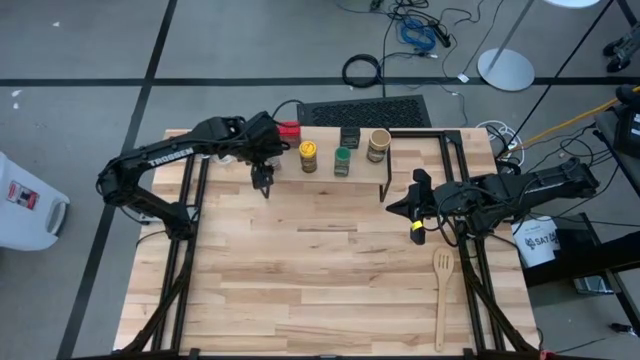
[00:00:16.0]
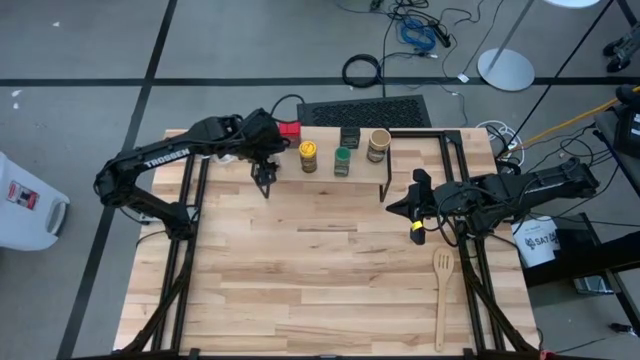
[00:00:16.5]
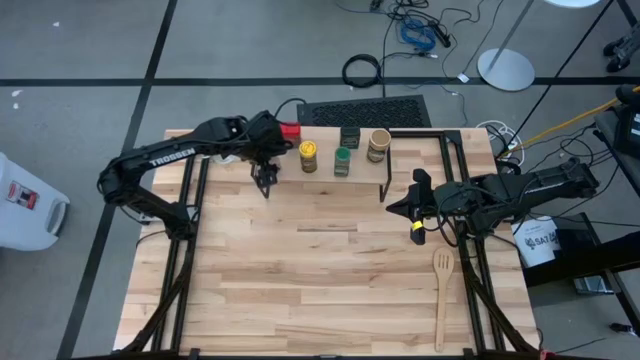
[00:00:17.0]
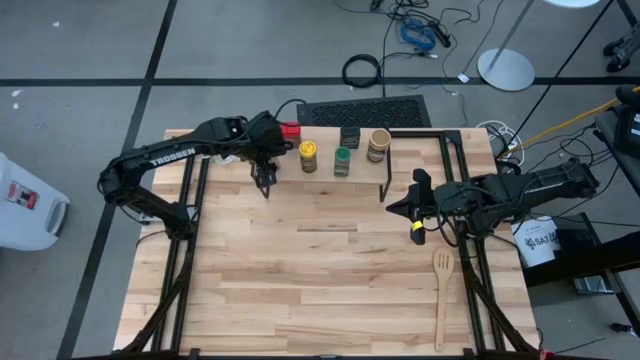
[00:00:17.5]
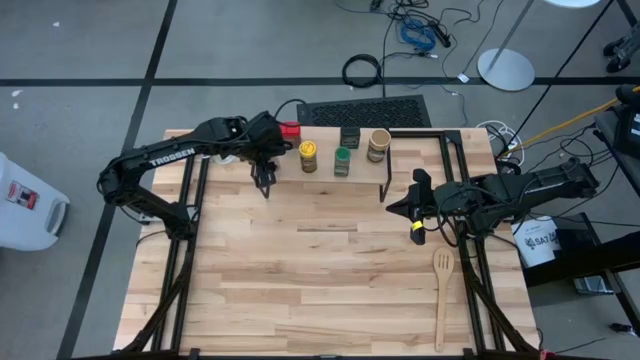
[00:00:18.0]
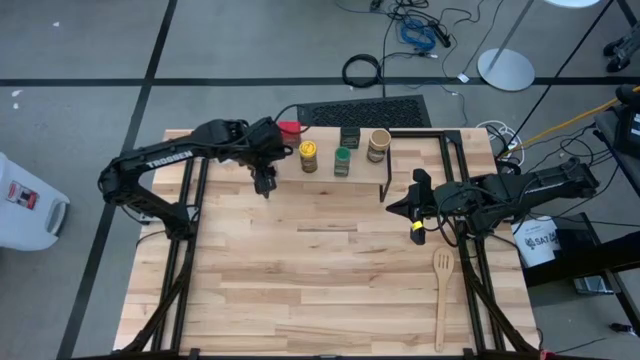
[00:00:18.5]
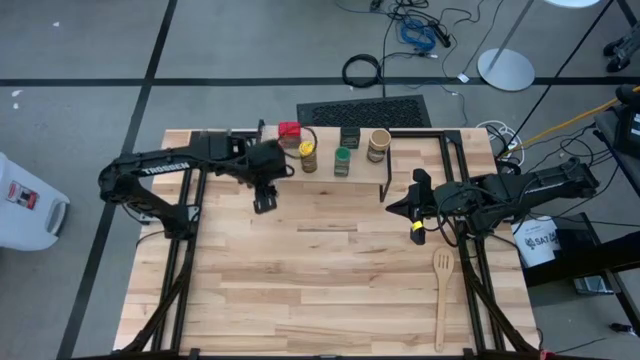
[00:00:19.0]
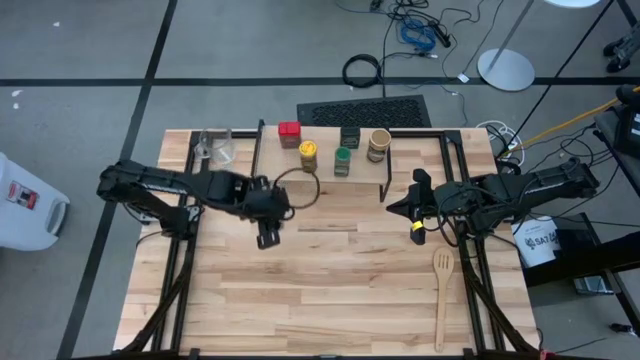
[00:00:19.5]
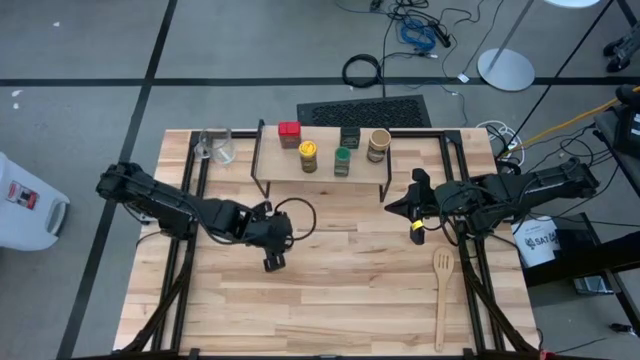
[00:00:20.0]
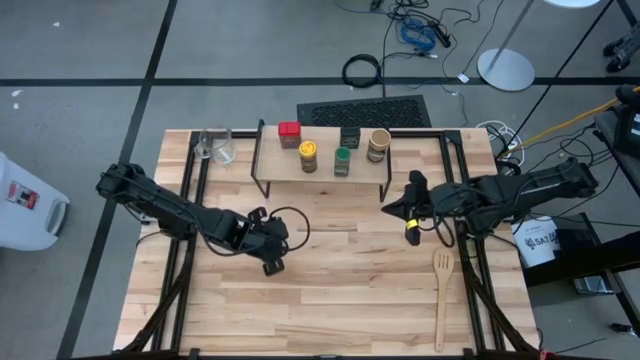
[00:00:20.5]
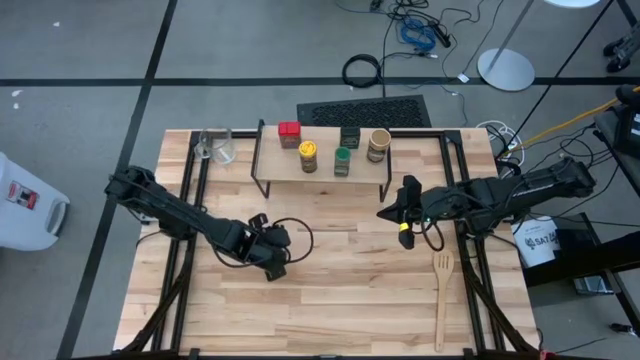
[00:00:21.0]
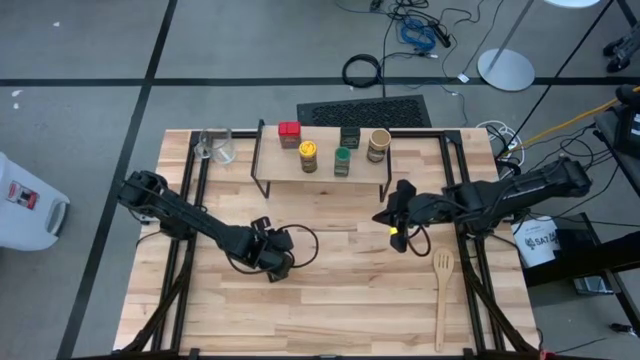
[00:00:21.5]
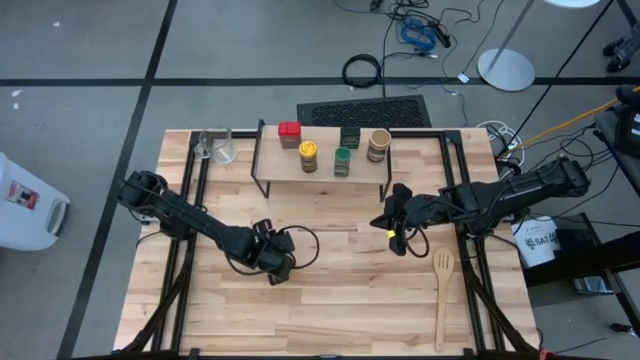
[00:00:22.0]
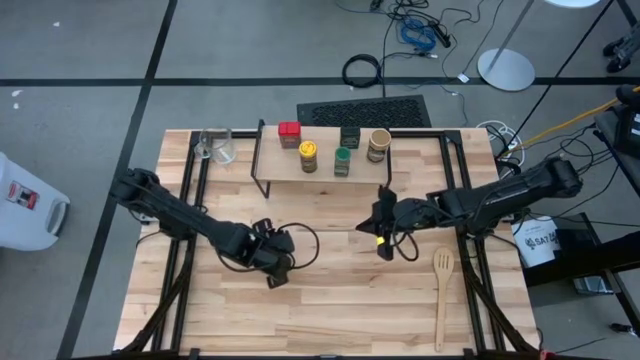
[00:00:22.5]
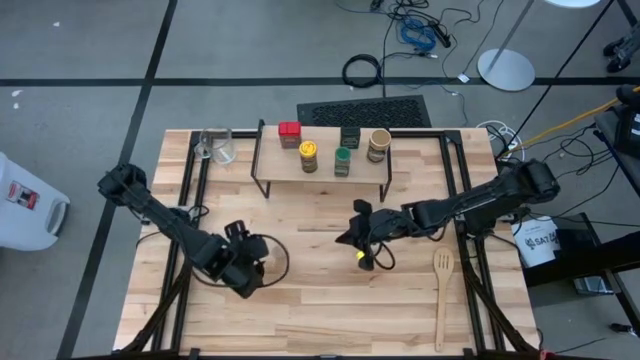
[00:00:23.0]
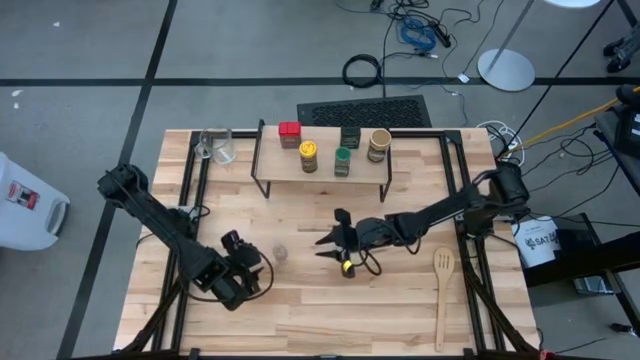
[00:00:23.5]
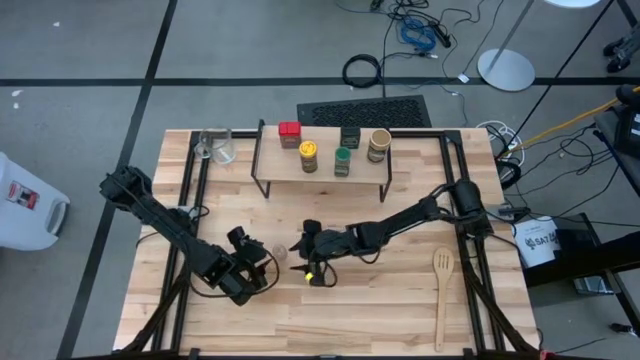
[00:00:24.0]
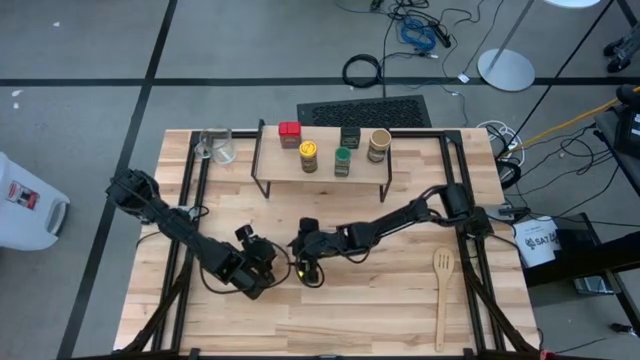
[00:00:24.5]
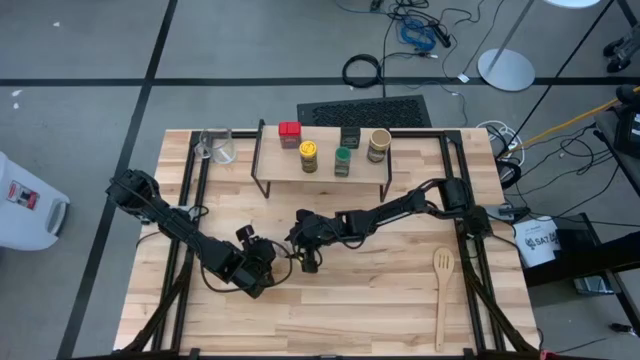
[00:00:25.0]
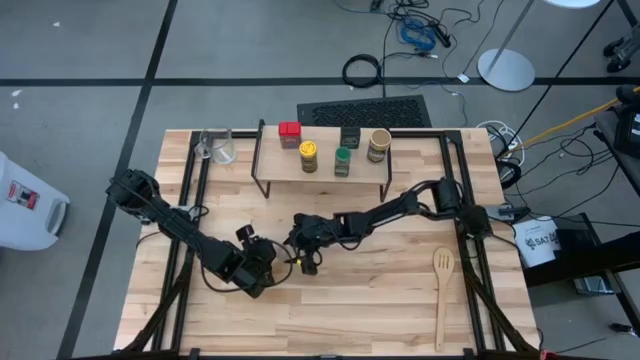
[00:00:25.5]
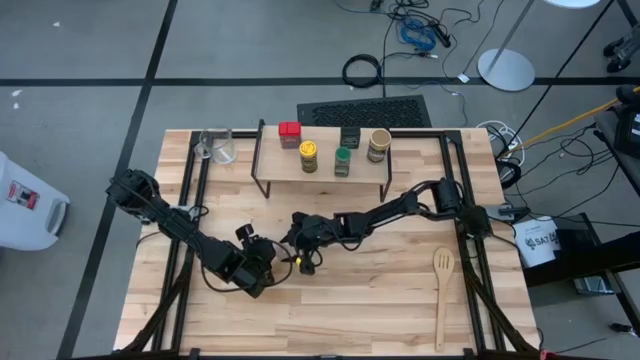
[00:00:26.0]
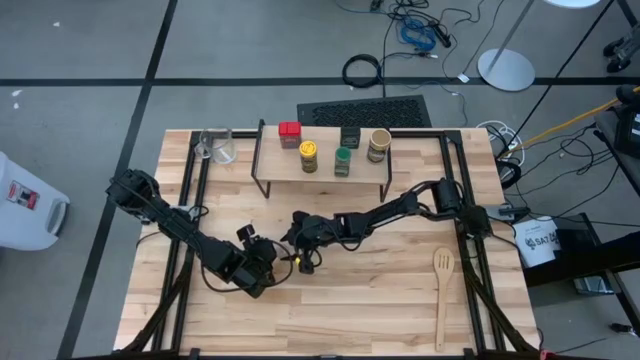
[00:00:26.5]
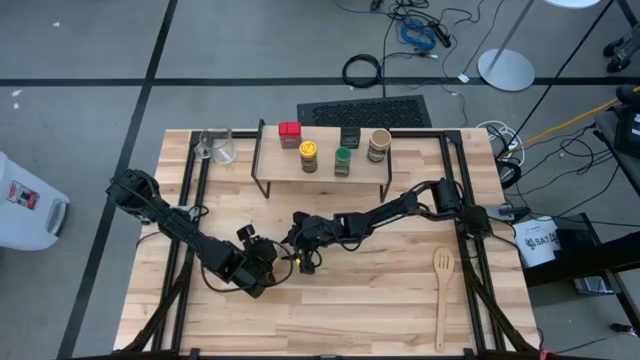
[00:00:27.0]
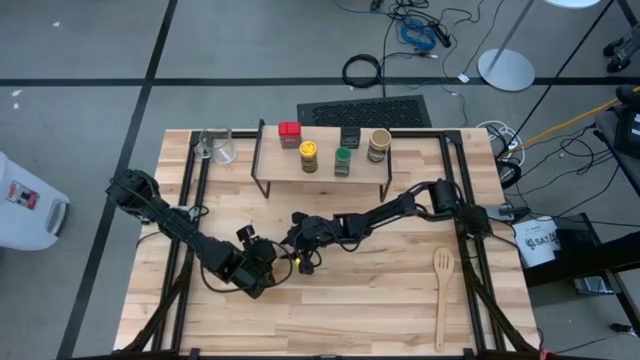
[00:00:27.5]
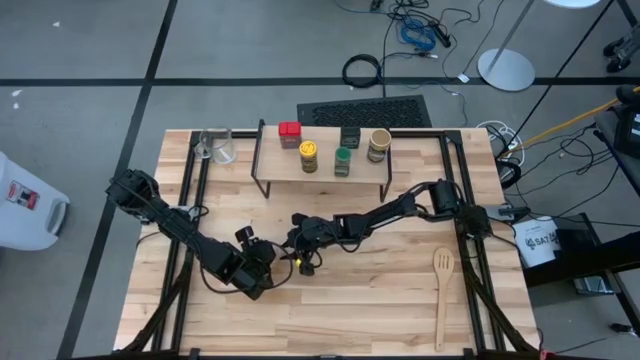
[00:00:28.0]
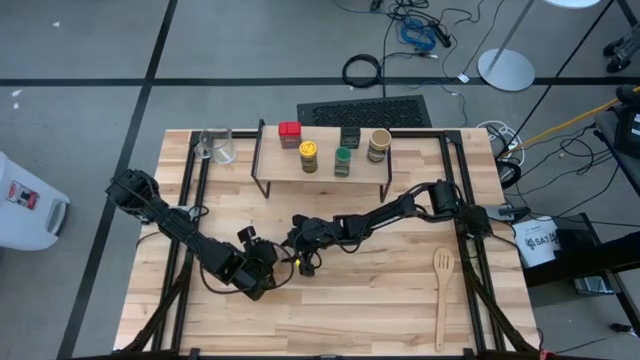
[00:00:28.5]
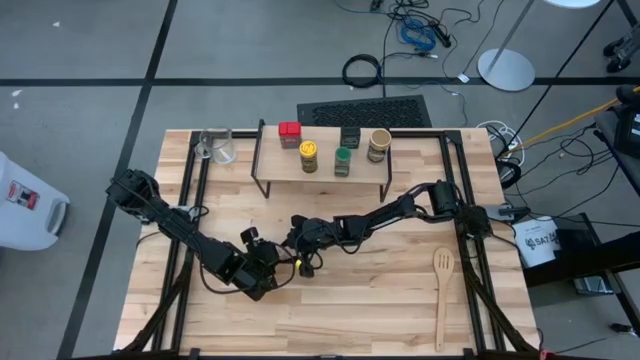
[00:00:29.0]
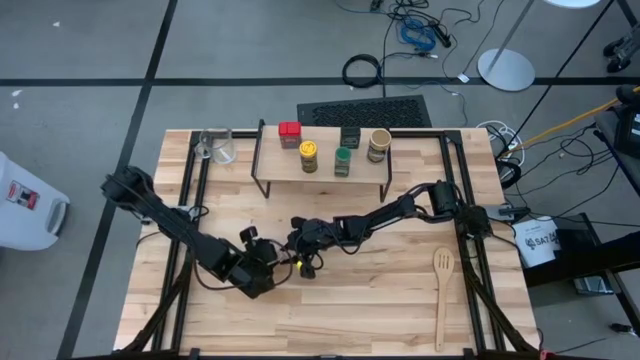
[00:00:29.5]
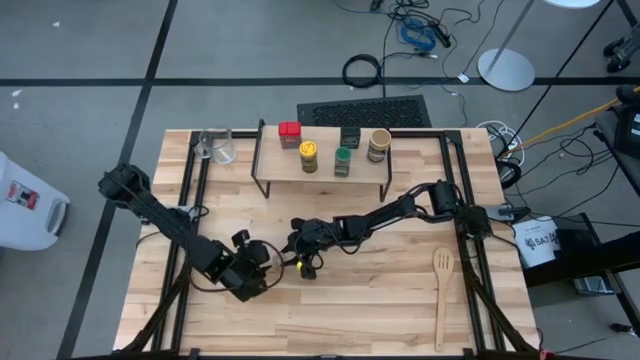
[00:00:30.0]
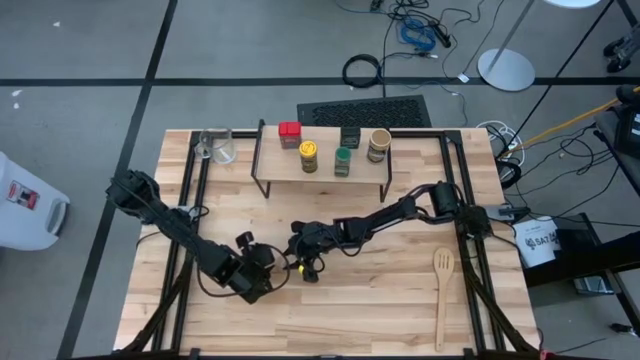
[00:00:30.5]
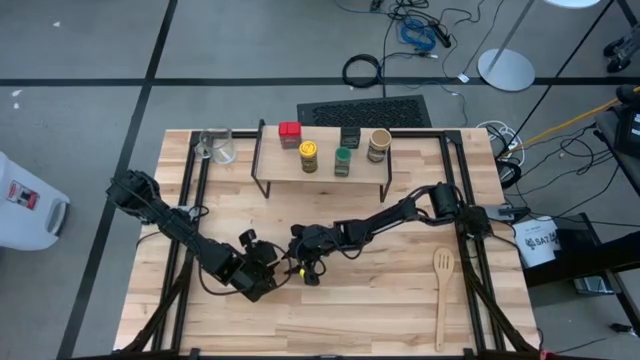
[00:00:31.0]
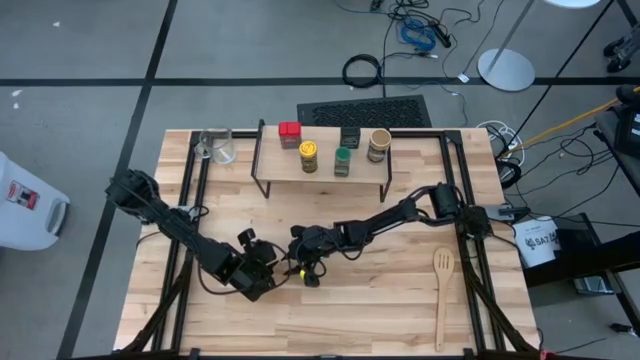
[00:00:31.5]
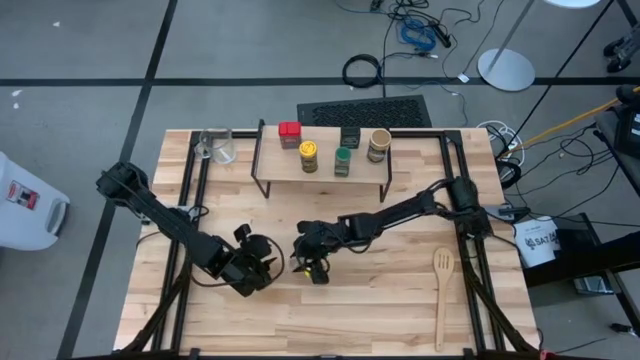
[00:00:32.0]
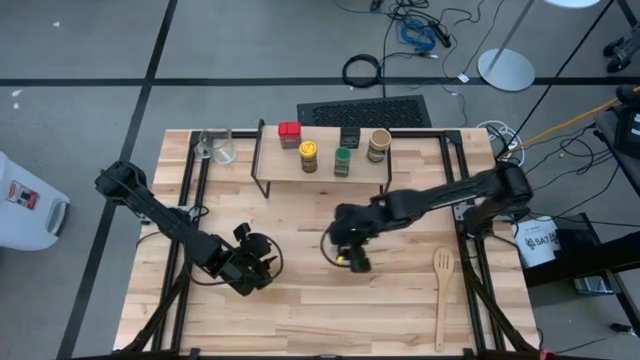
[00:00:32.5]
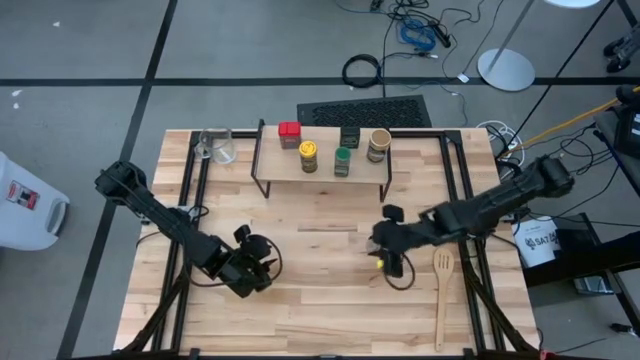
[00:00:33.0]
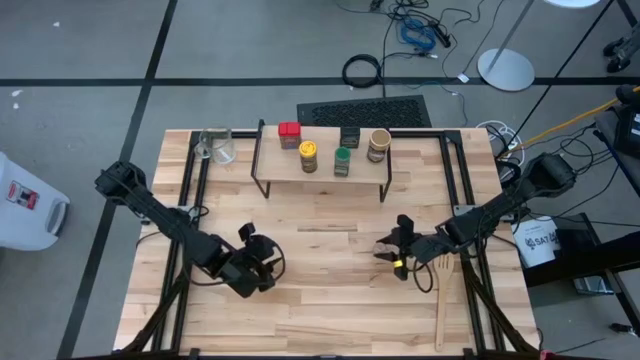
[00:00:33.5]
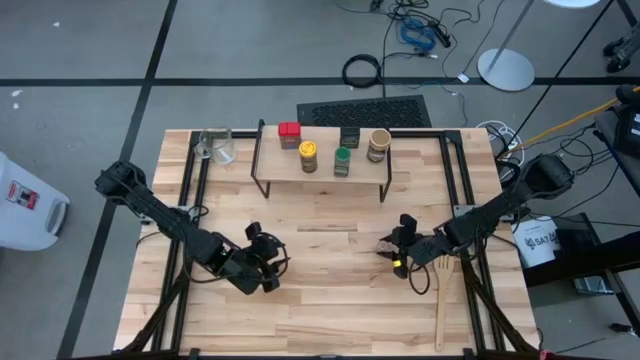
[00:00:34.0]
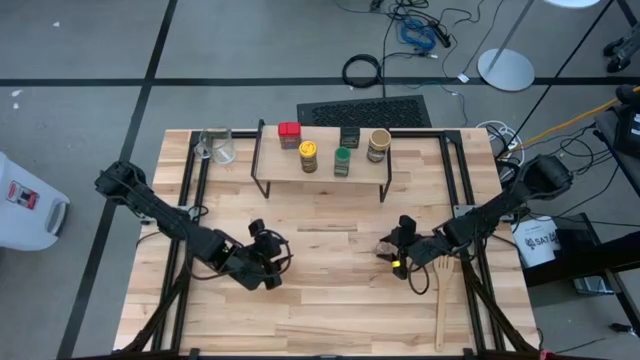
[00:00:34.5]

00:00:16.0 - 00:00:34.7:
Task: Shelf spices
Remove the brown seasoning bottle from the shelf
